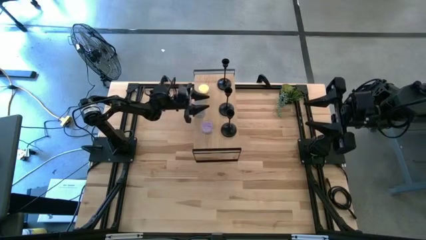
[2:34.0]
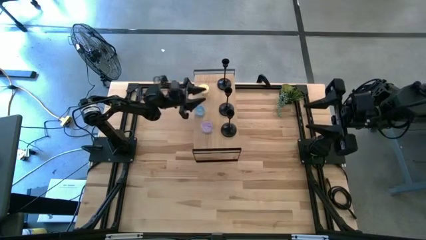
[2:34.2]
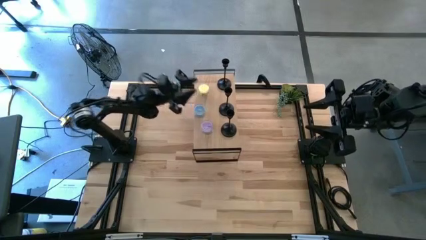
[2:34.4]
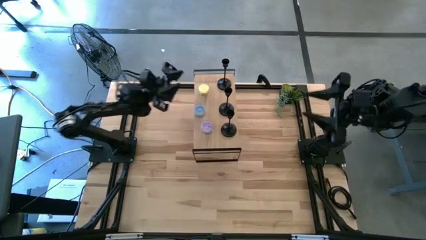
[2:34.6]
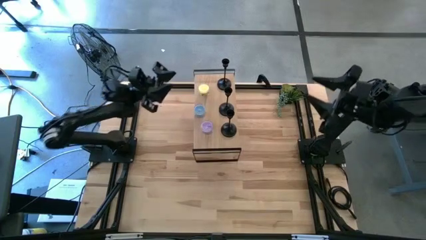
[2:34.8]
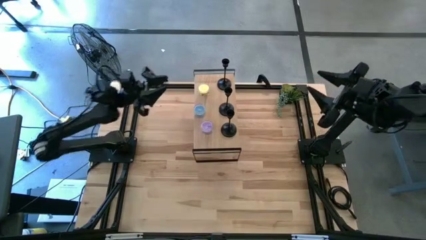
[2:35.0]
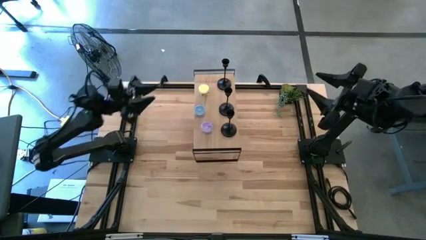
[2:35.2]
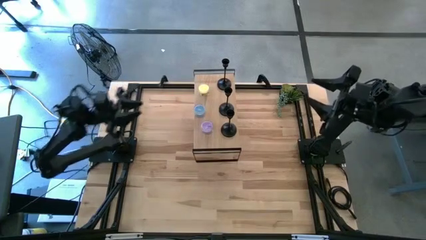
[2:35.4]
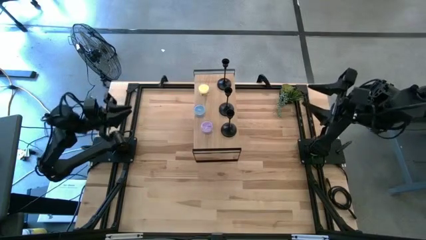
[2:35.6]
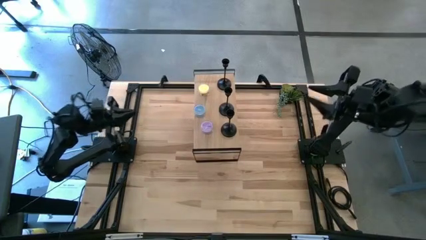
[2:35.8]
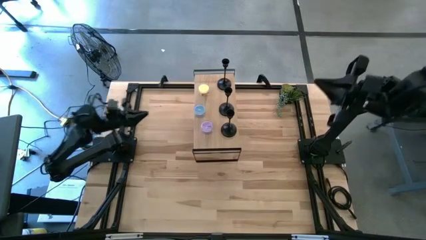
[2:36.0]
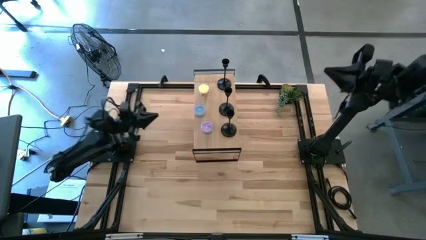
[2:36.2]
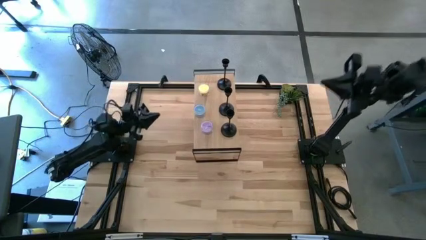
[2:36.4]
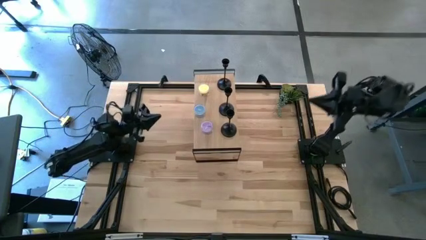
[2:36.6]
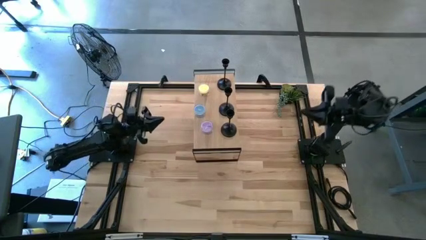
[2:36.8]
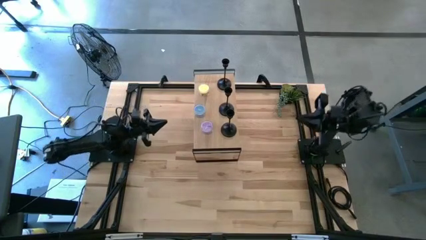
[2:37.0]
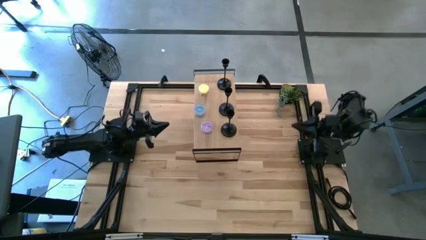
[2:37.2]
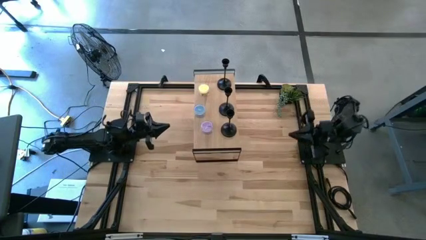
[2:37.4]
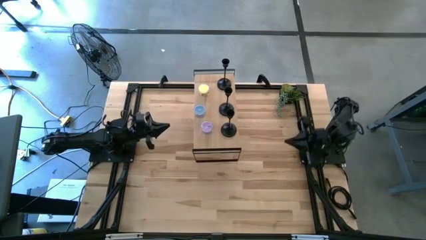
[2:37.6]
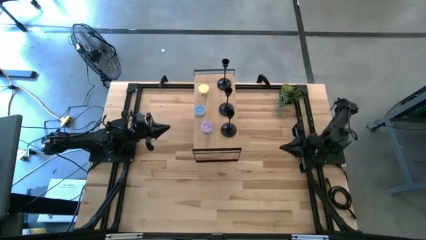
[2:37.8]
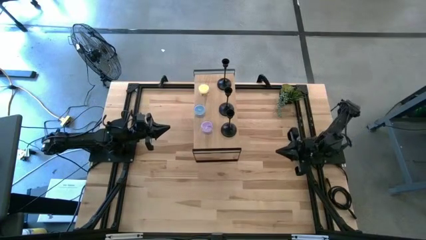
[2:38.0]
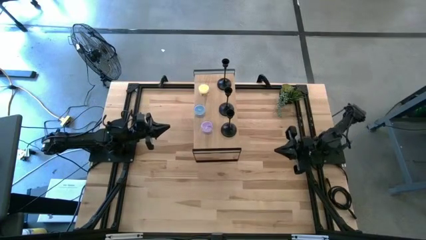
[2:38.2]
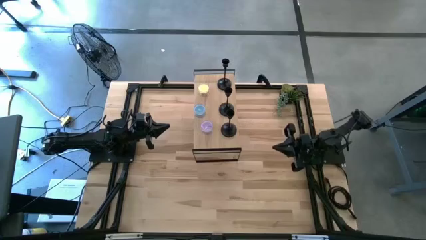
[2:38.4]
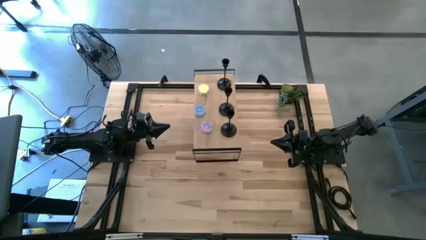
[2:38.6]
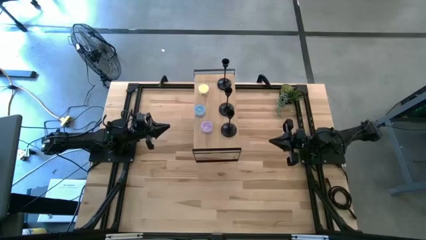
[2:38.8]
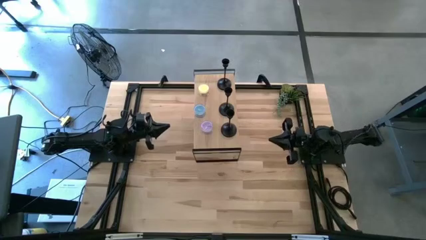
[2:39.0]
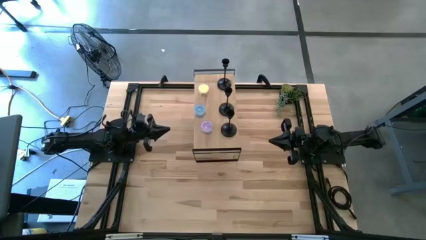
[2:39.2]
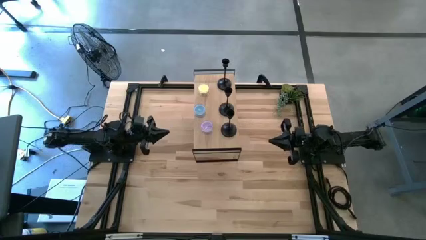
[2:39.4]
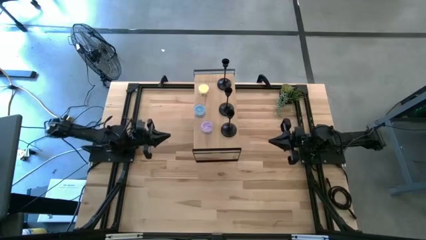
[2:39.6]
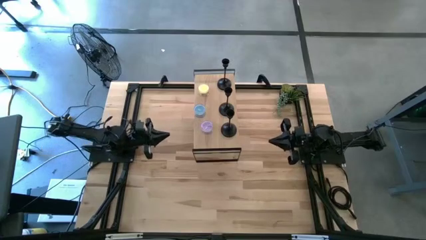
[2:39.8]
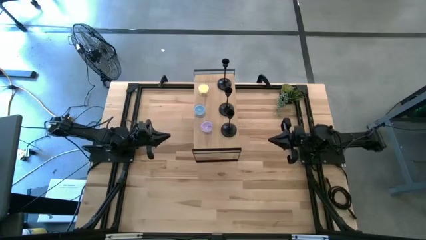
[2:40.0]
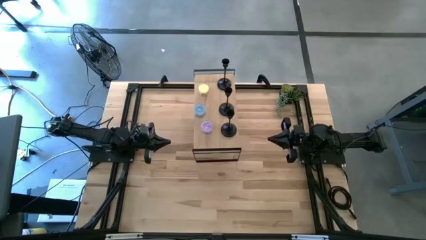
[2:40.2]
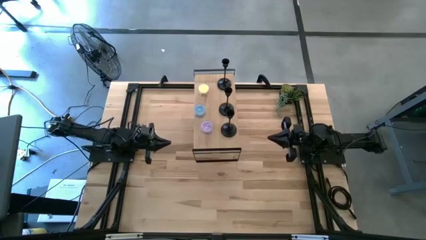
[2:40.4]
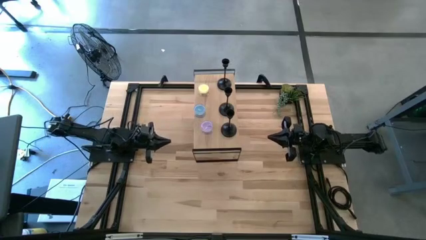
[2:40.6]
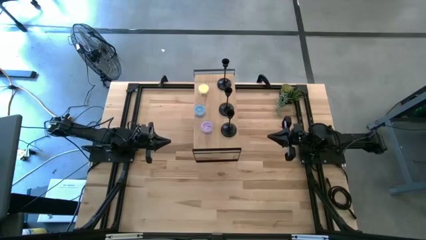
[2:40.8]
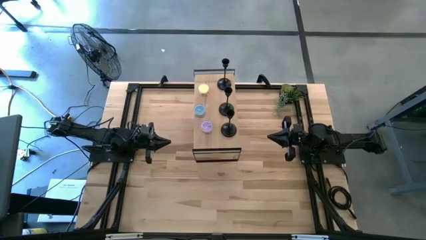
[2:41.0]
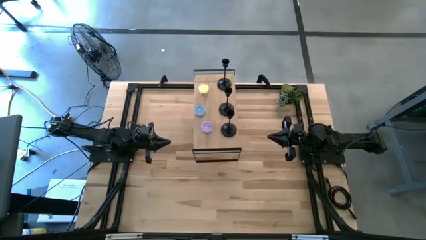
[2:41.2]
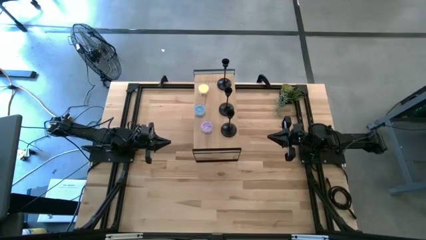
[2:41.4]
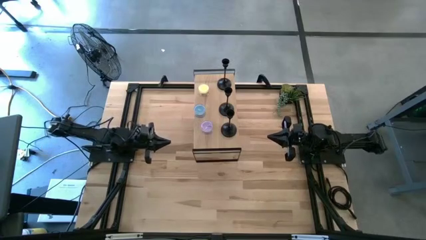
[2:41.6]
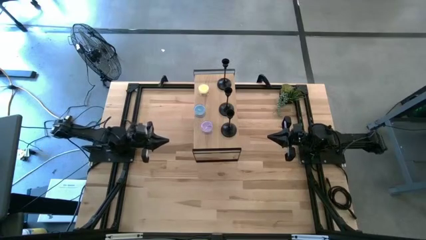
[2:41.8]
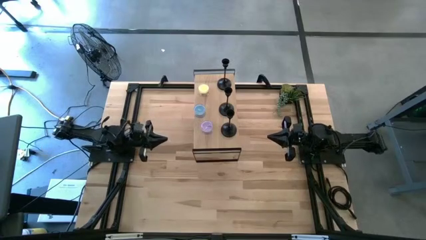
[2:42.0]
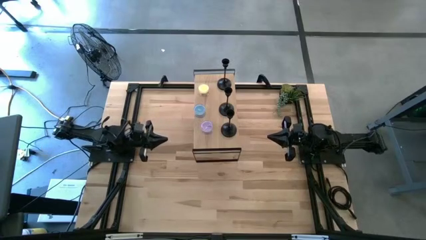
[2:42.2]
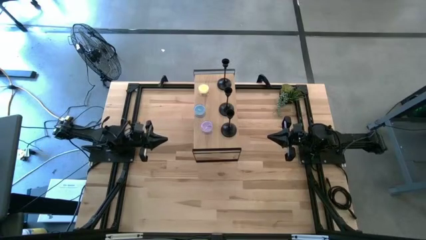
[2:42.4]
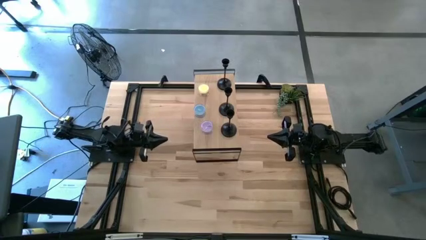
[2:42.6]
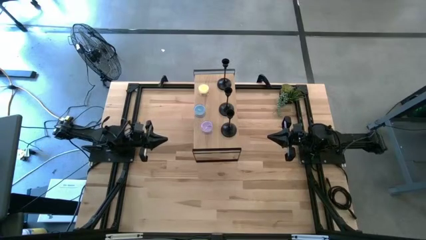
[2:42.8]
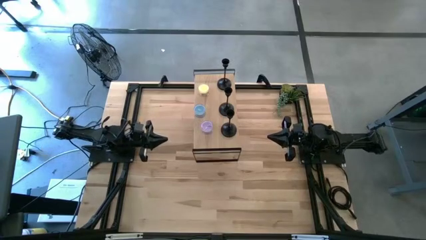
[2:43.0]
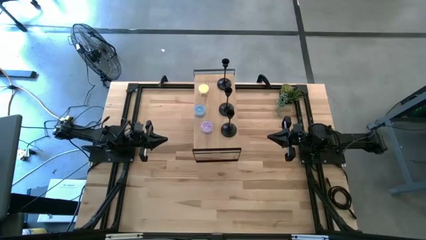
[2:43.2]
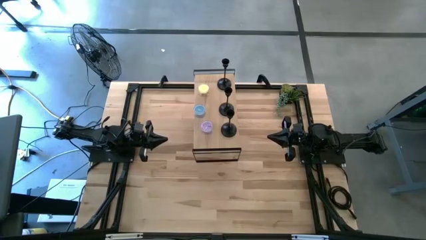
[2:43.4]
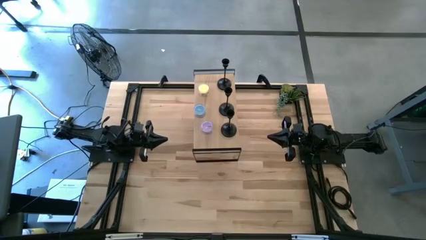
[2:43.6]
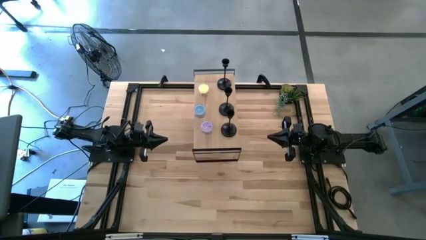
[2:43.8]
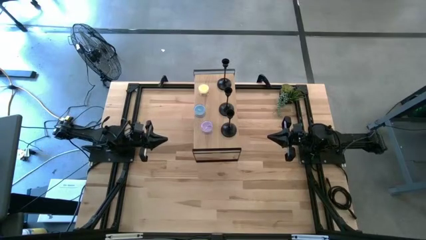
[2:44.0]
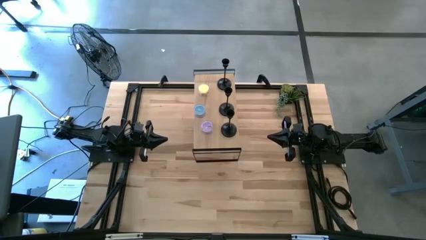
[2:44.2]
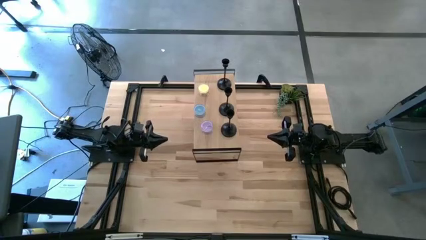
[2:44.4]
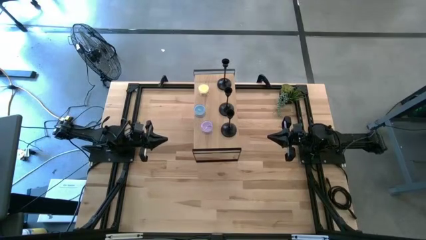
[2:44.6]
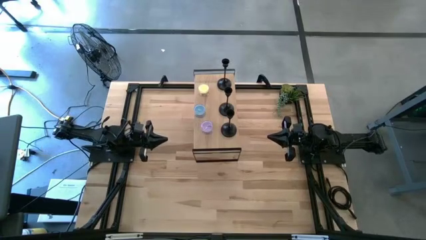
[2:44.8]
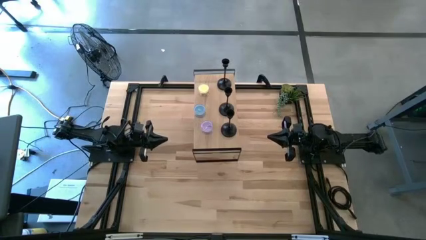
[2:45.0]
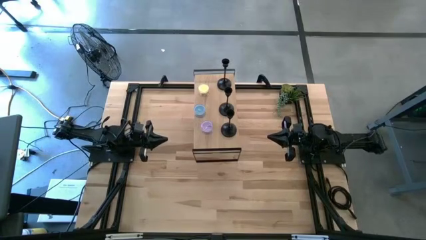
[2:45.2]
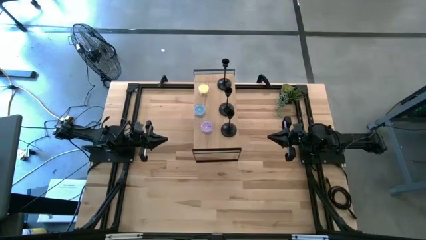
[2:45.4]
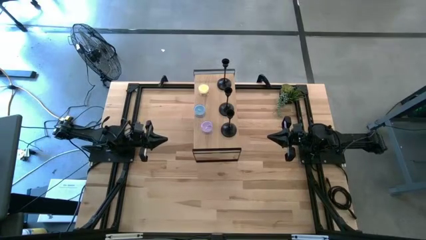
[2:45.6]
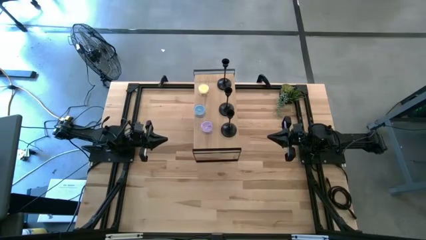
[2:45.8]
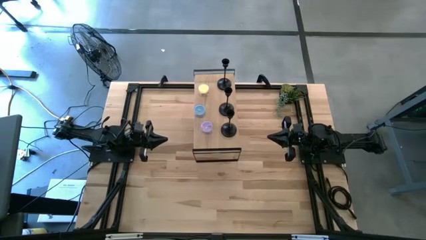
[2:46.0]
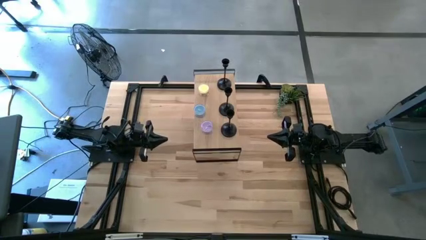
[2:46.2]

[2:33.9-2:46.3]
Task: Pick & Place candle stick holders
Return to Home Position

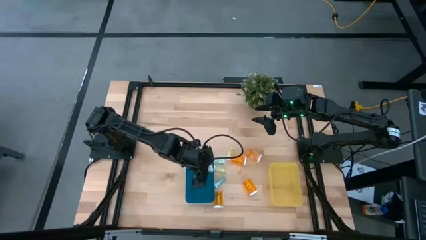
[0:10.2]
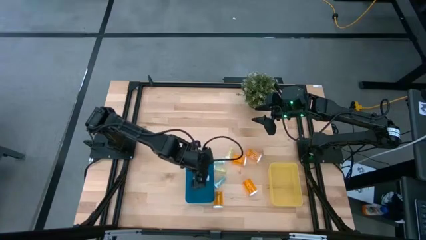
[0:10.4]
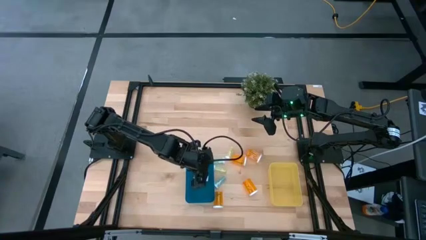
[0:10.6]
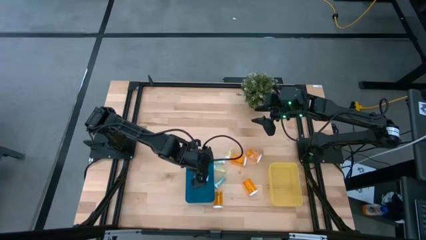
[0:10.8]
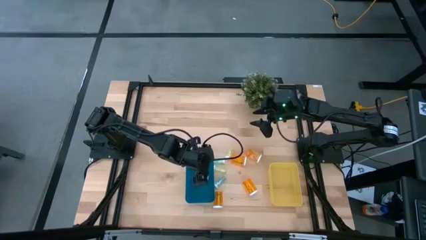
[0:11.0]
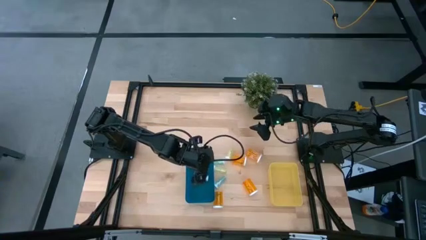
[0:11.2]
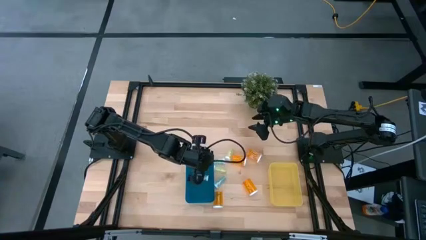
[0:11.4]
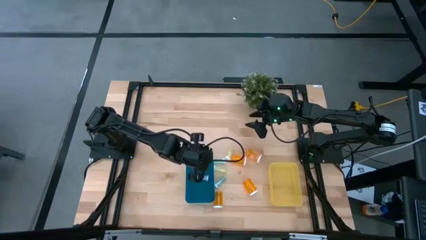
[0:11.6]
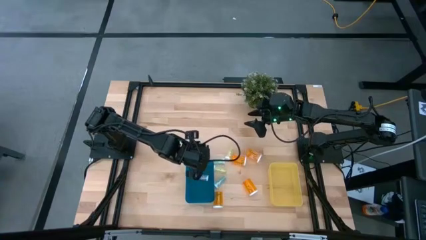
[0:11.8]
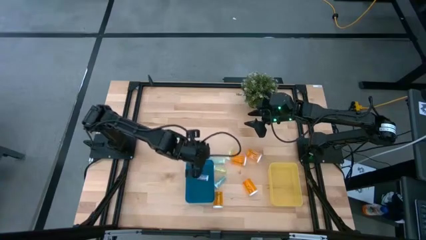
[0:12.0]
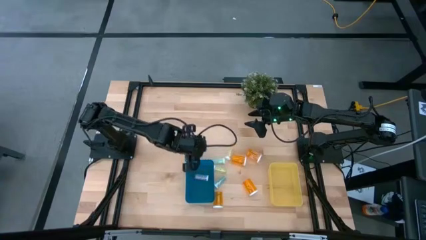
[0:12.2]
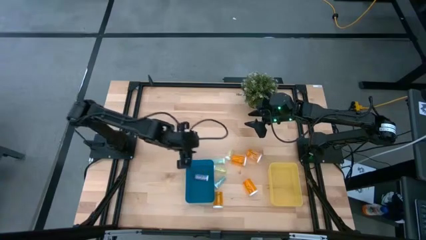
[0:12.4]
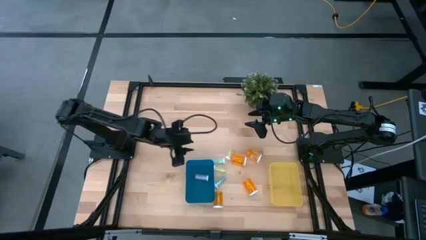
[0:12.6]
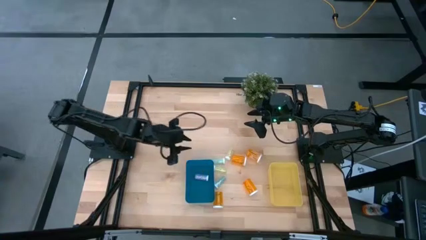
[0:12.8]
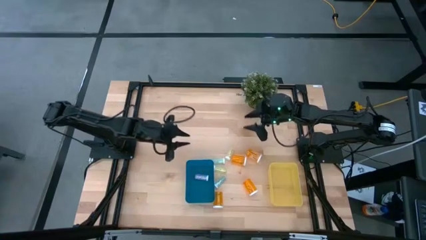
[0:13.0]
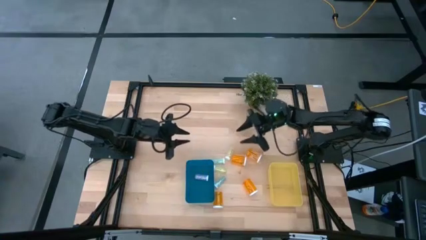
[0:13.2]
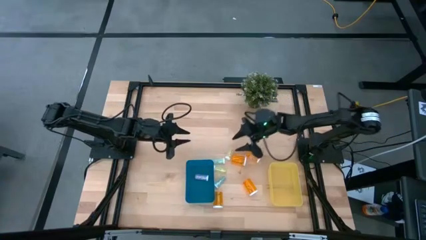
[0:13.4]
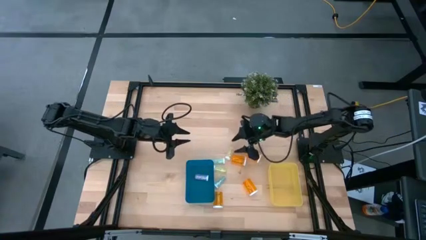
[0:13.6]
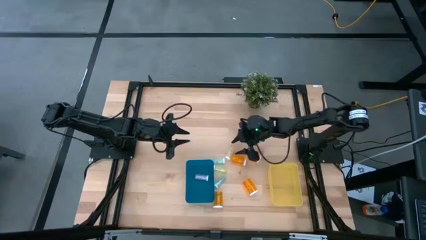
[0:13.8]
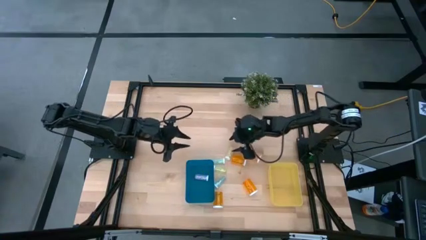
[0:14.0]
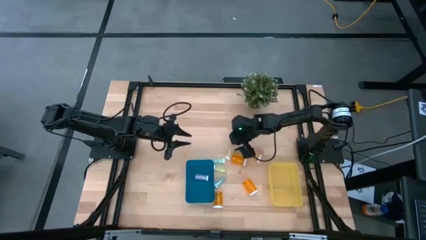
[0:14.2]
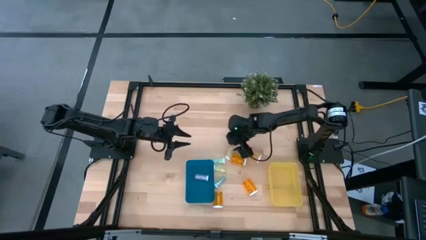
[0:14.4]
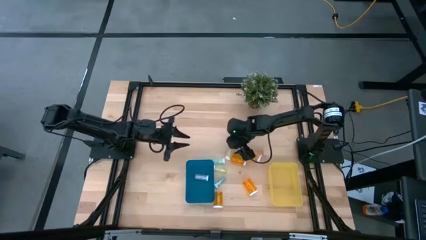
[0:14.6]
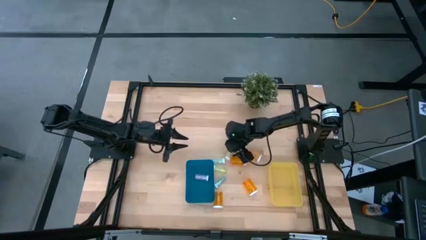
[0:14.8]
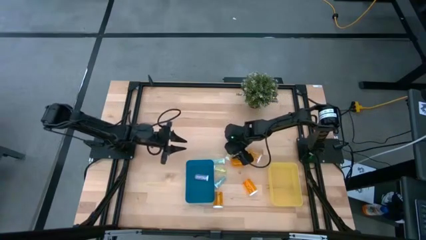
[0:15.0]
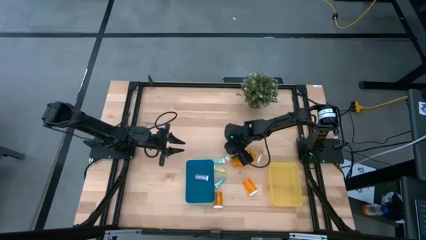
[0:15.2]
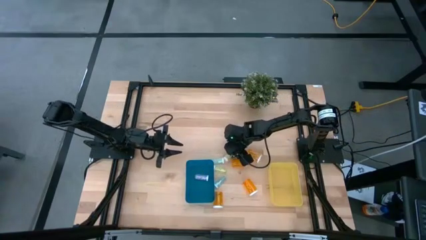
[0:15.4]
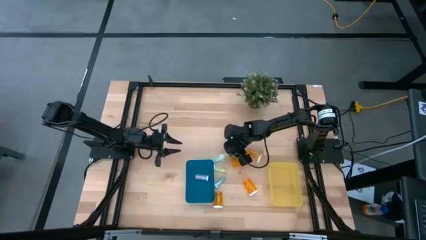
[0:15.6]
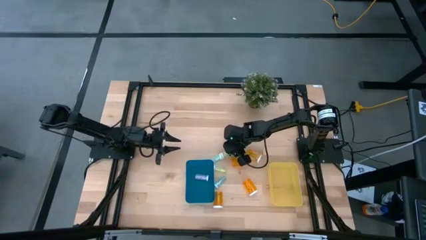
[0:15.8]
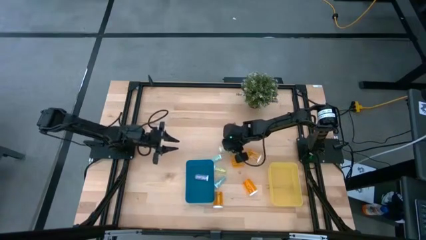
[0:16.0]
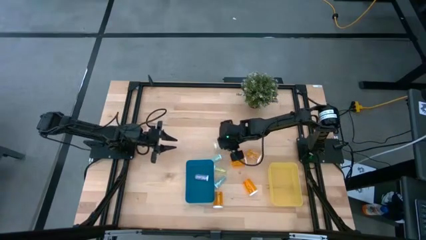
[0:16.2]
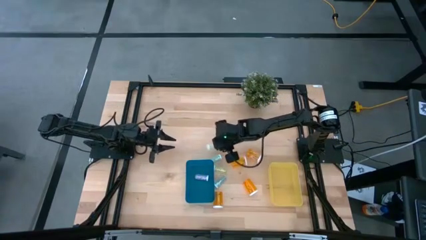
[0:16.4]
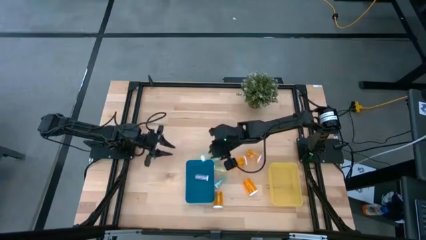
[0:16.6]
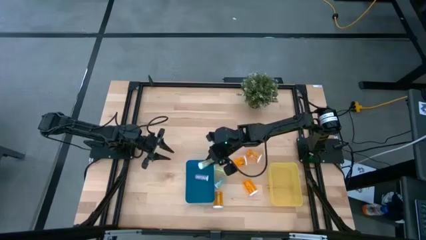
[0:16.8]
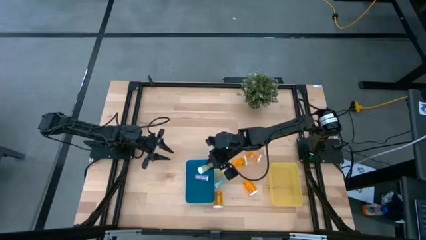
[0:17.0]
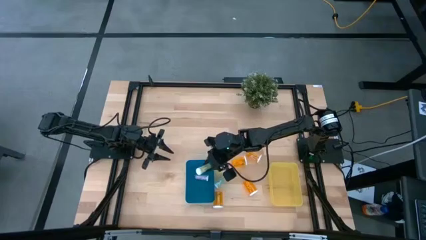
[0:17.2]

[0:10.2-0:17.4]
Task: Pick and place medicine bottles into bin by pill shape (circle, oval)
Put the small yellow pill bottle into the blue bin
